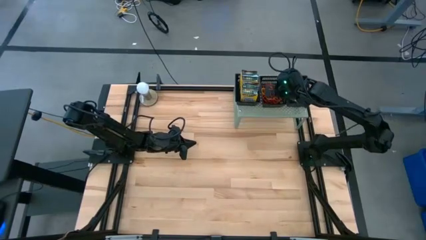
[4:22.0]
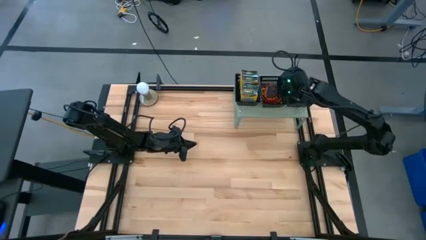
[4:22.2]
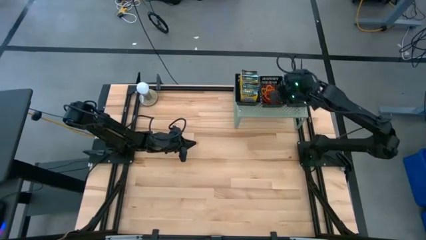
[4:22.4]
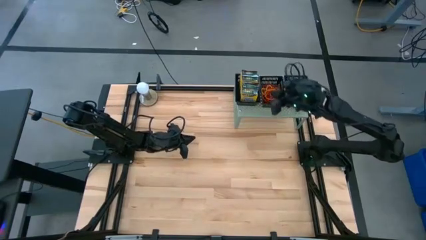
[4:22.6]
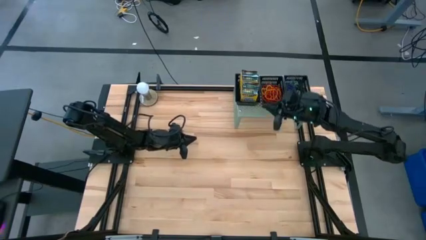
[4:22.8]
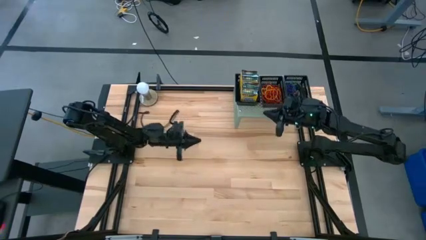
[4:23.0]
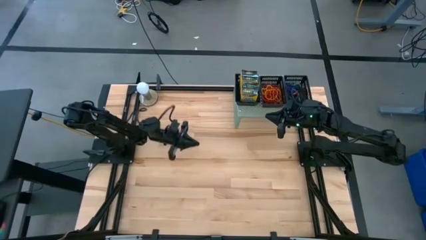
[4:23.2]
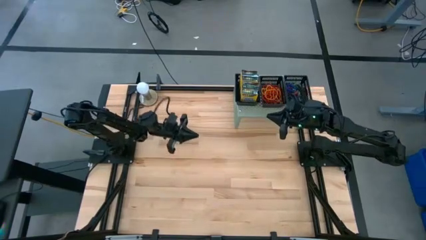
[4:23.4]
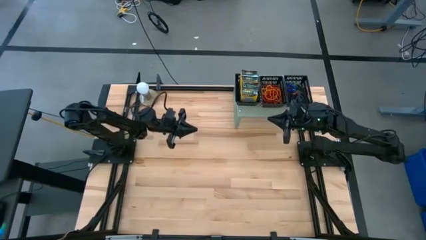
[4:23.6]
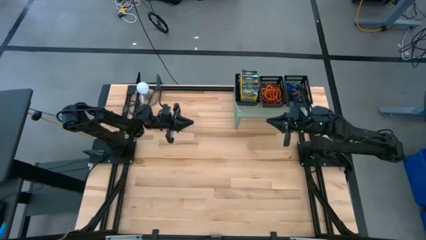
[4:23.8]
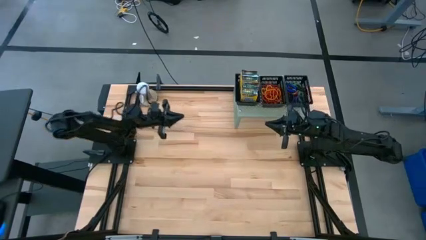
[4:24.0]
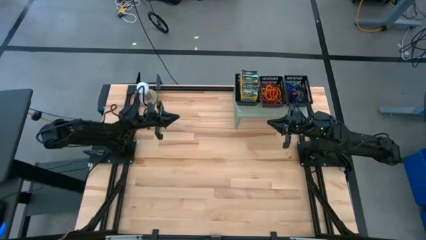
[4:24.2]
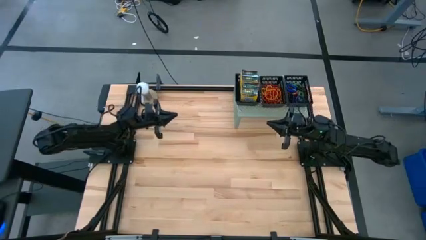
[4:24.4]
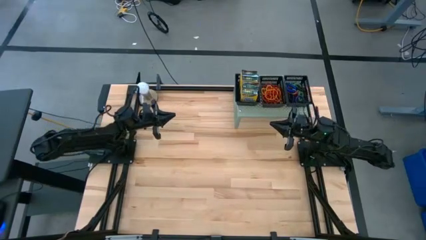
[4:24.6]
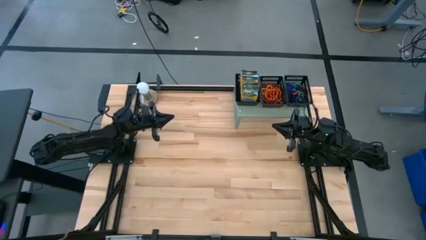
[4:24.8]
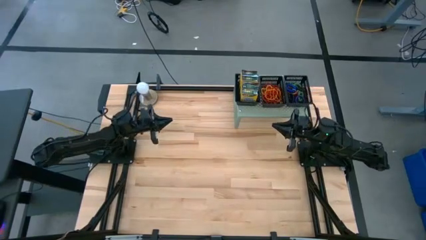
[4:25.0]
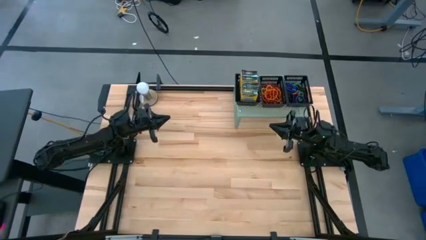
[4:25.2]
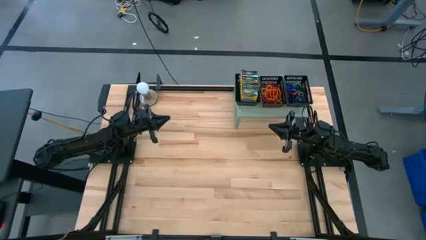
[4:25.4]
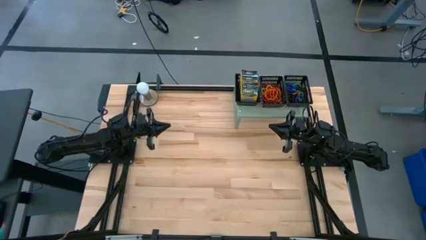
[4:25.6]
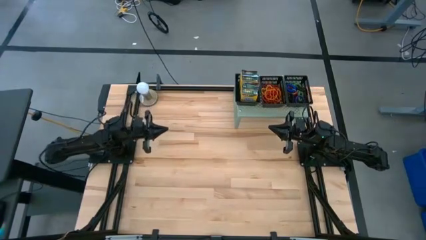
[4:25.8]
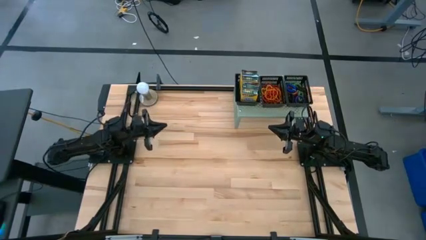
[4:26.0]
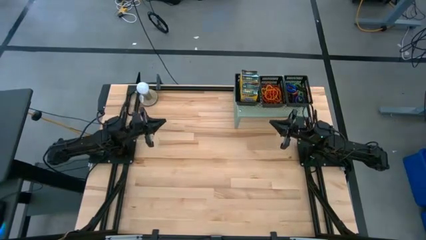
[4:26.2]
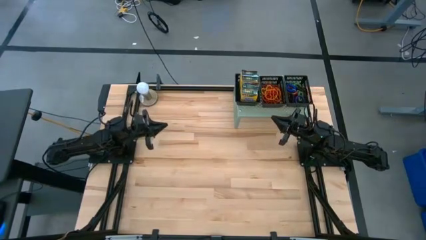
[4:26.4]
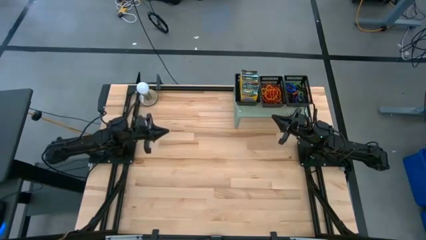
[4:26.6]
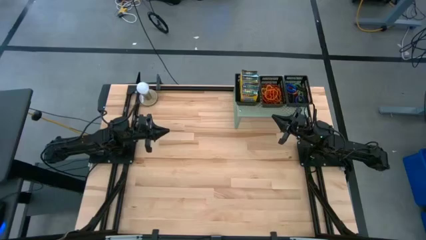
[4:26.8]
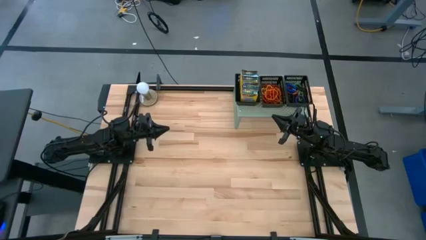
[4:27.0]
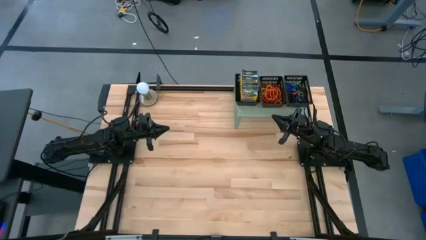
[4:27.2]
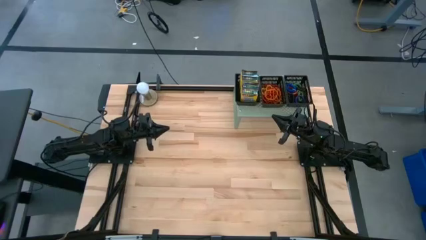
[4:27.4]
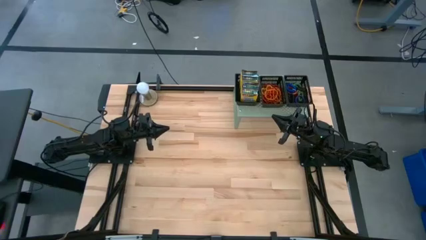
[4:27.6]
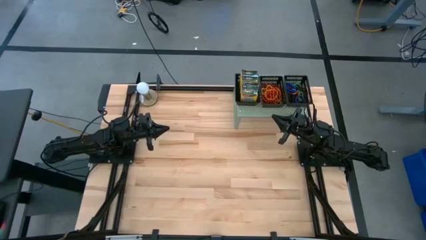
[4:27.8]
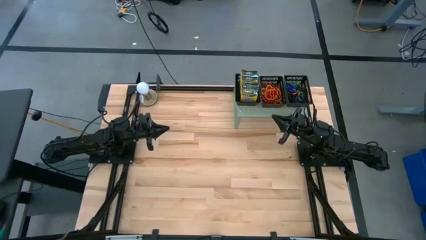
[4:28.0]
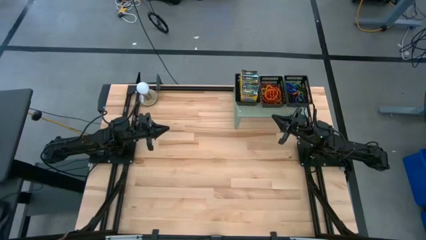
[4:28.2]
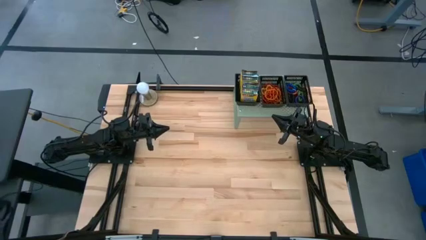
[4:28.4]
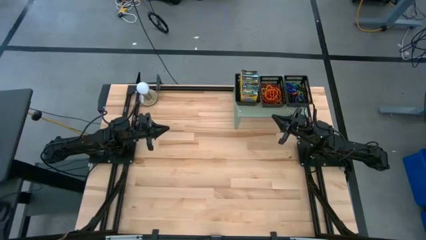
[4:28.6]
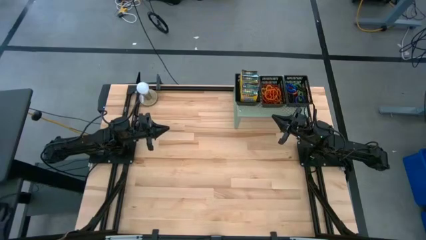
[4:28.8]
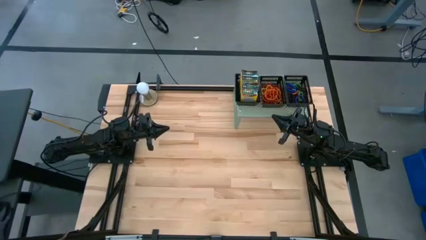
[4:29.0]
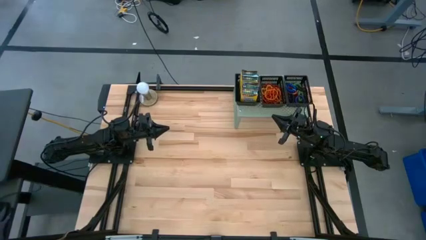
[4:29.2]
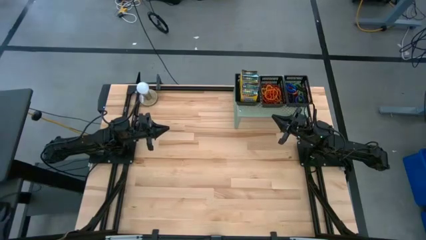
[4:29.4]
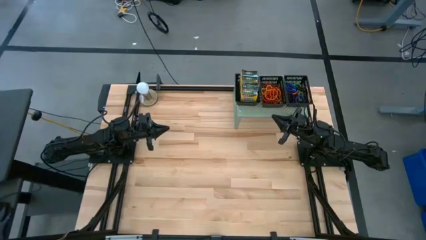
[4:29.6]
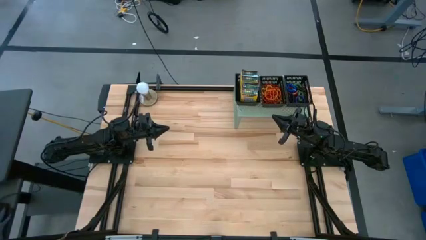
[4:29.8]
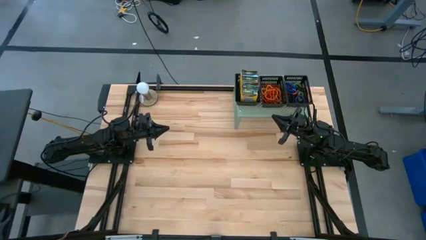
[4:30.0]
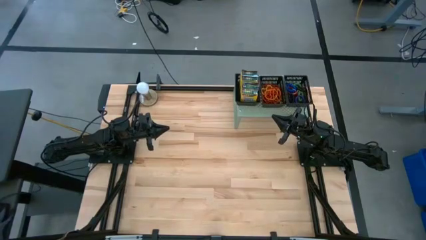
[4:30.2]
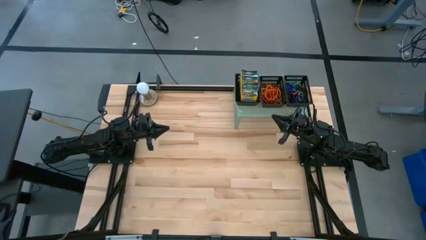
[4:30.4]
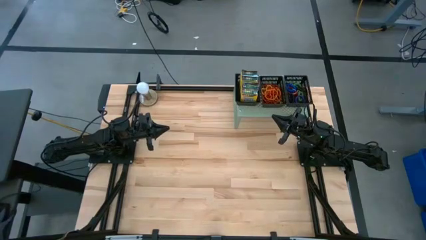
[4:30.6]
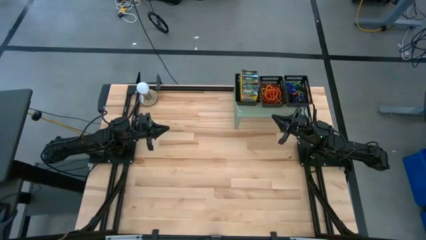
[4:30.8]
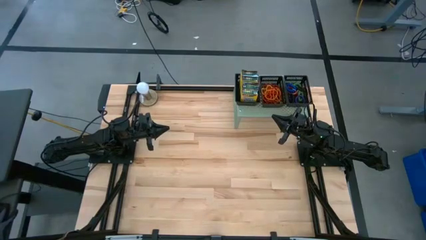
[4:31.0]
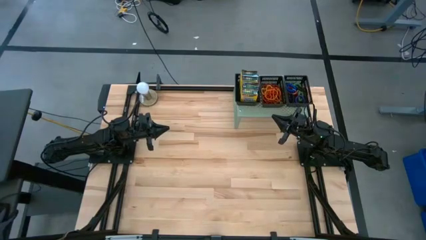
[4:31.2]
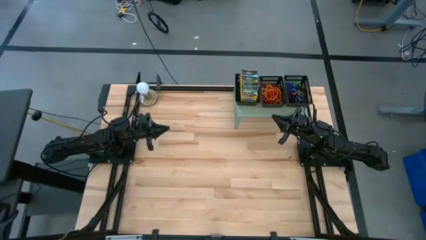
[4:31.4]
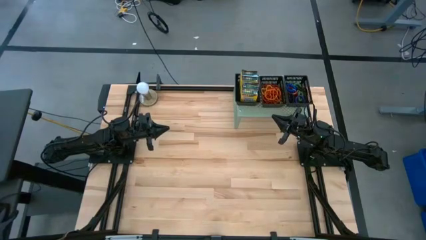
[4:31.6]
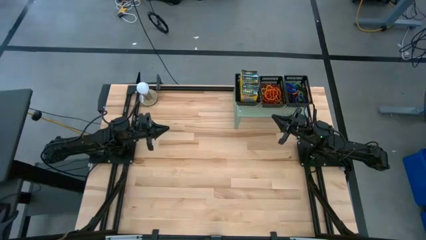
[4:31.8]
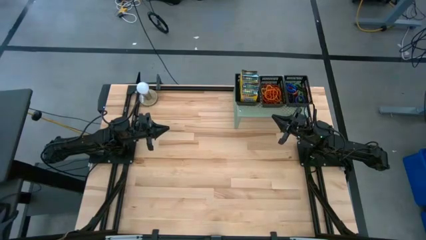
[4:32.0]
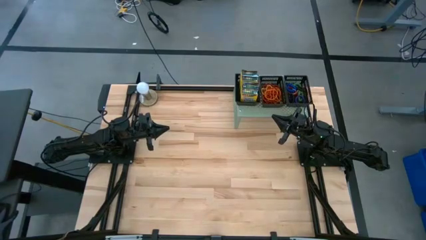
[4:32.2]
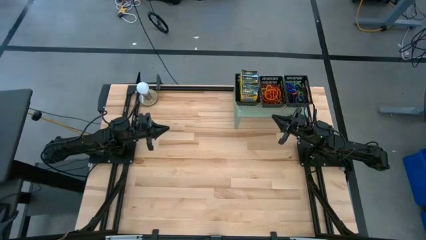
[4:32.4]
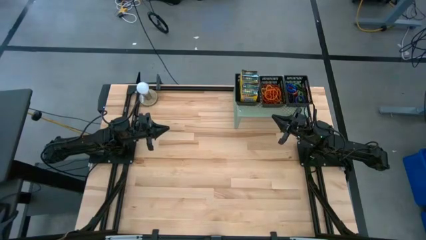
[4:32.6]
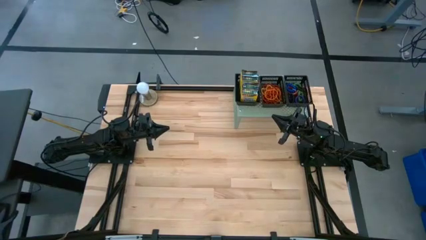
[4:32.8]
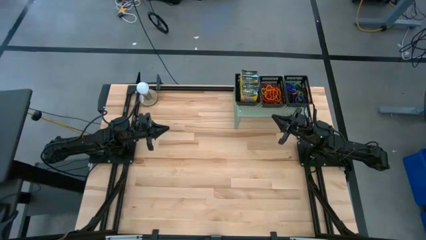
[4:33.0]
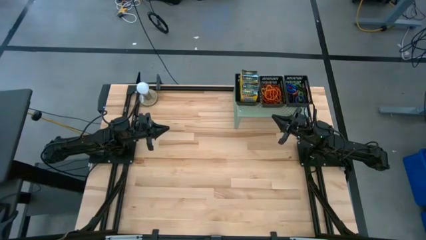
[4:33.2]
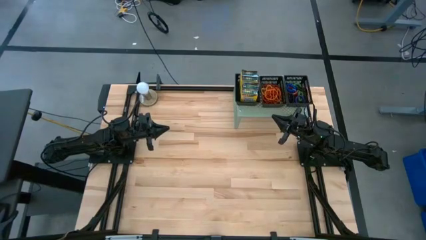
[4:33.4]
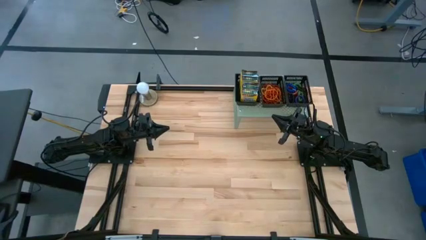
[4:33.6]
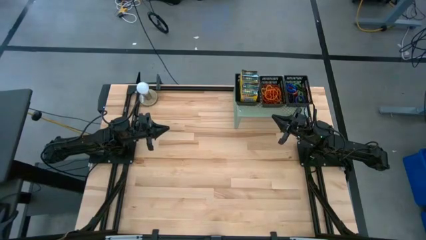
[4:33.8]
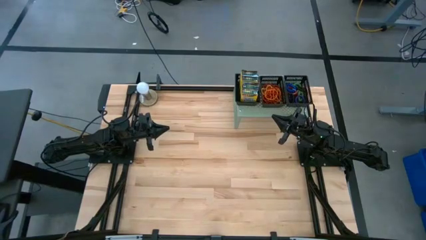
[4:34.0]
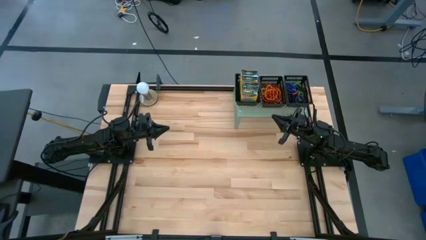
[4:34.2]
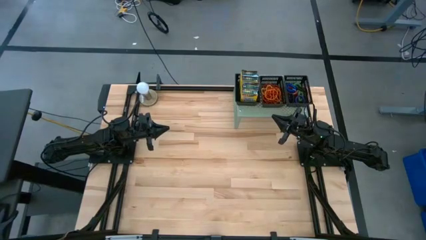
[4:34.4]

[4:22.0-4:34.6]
Task: Pick & Place Office Desk Supplies
Return to Home Position

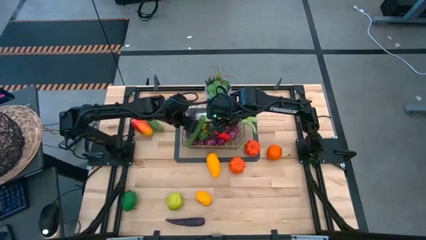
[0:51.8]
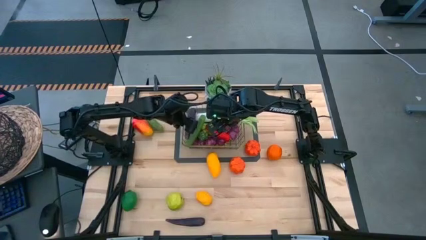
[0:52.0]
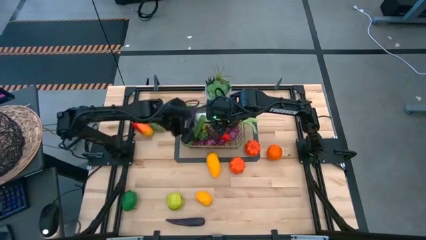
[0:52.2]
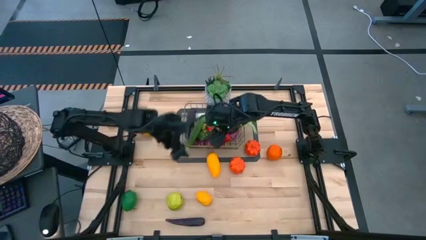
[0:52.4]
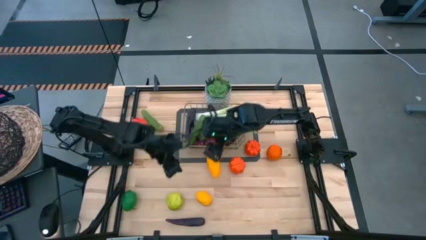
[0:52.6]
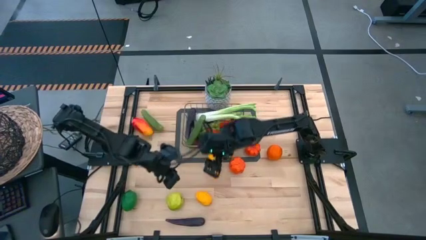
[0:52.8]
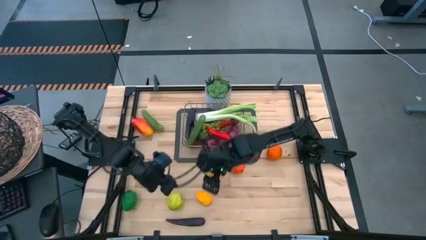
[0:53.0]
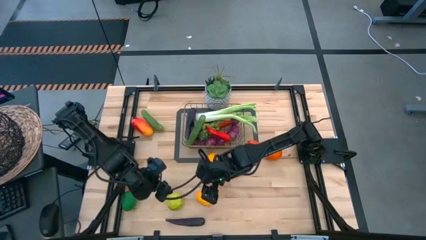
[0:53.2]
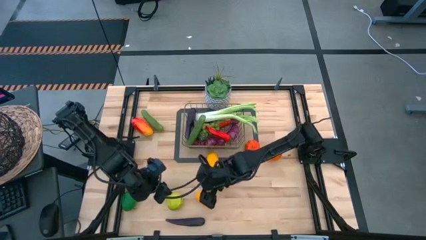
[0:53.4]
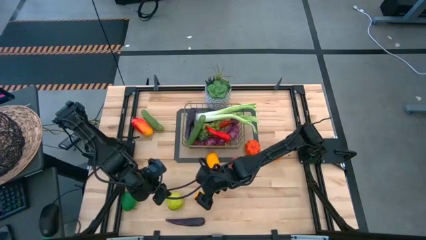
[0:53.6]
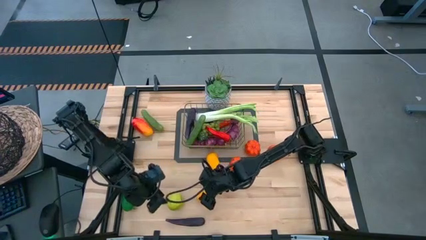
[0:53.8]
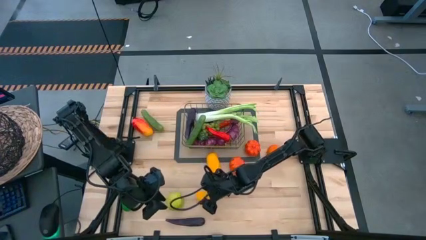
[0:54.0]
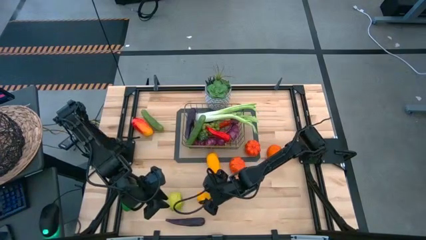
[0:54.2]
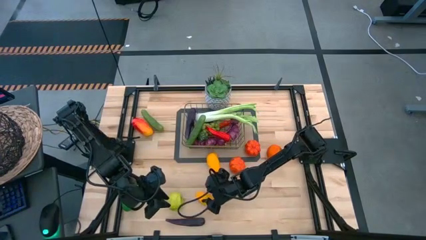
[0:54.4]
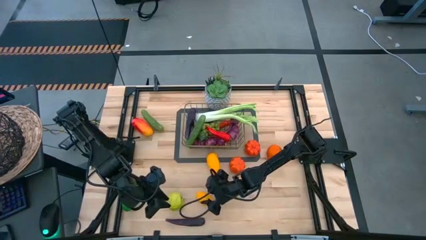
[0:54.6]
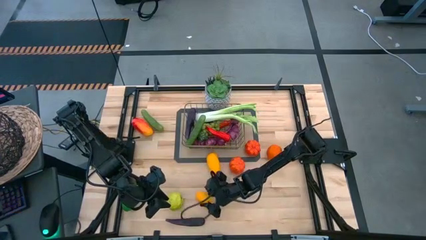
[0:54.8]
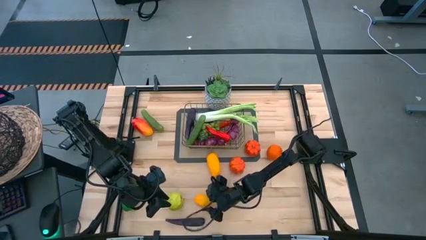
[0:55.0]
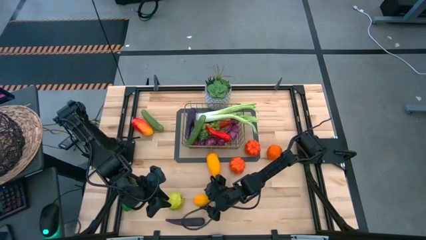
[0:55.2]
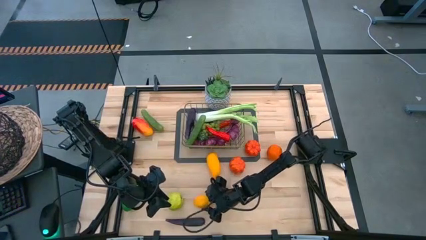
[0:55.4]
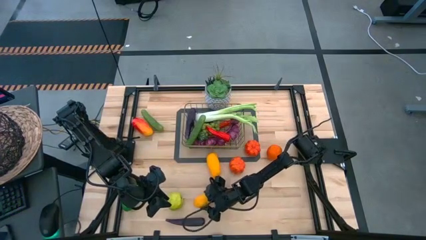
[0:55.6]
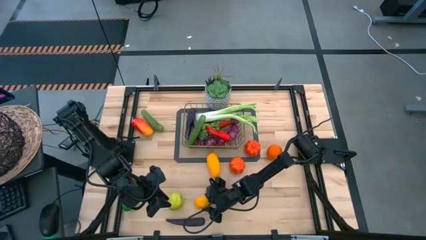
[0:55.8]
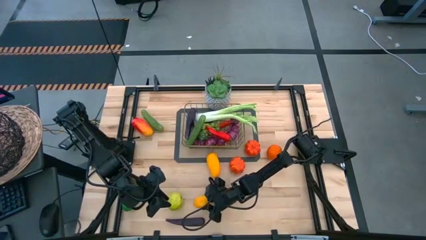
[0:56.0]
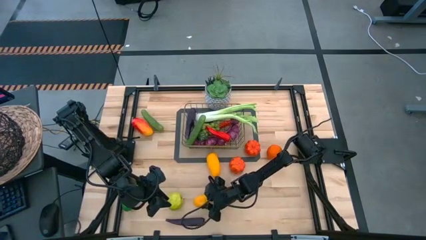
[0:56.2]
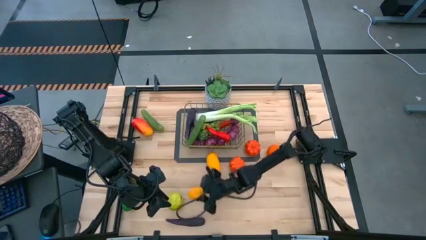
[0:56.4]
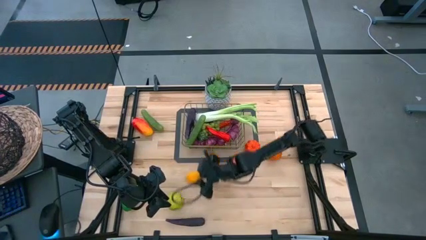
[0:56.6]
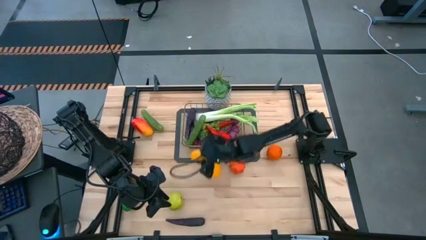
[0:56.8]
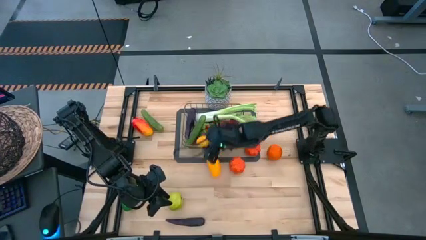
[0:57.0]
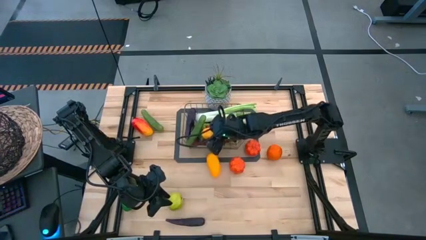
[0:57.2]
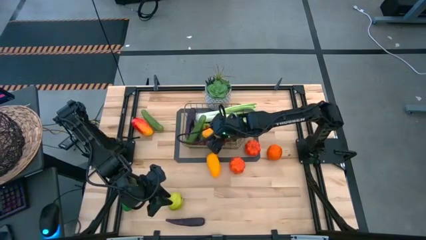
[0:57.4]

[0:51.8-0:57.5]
Task: Build produce basket
Put the yellow lemon into the wire basket
